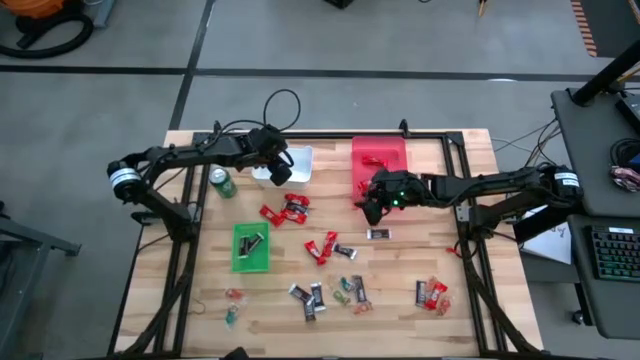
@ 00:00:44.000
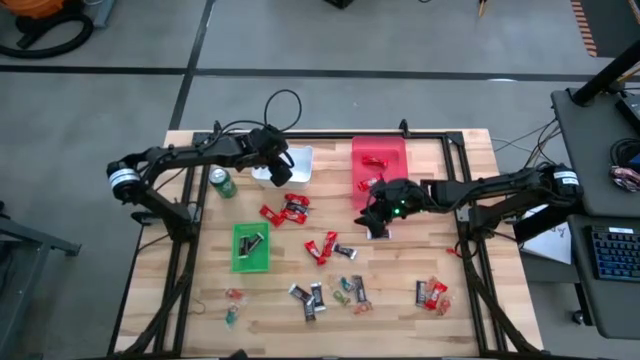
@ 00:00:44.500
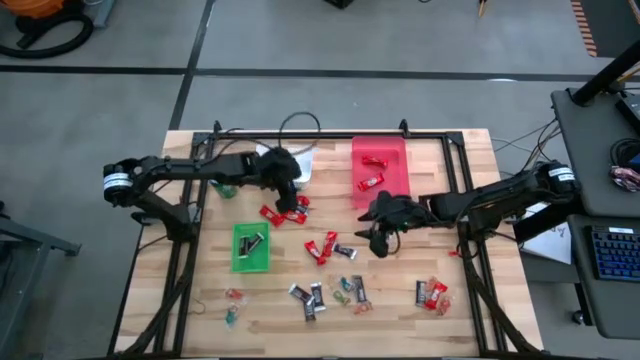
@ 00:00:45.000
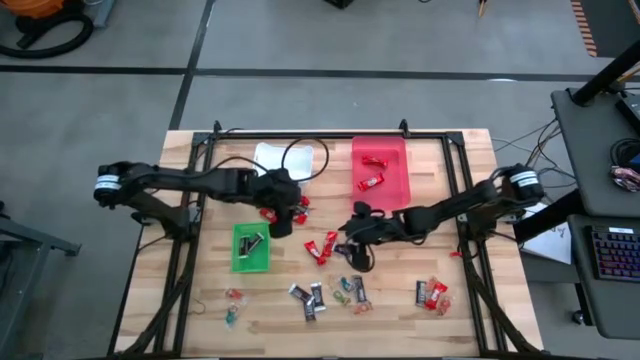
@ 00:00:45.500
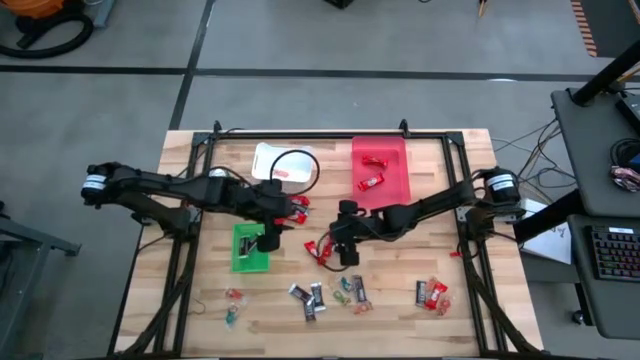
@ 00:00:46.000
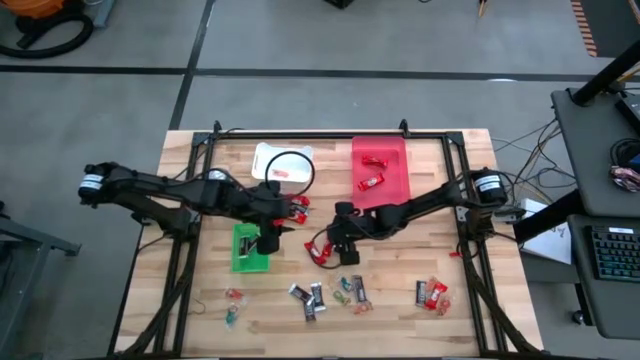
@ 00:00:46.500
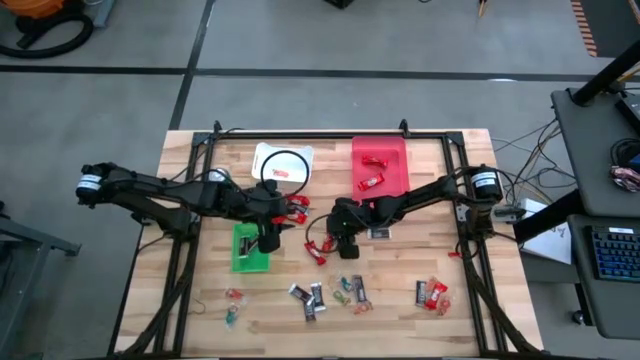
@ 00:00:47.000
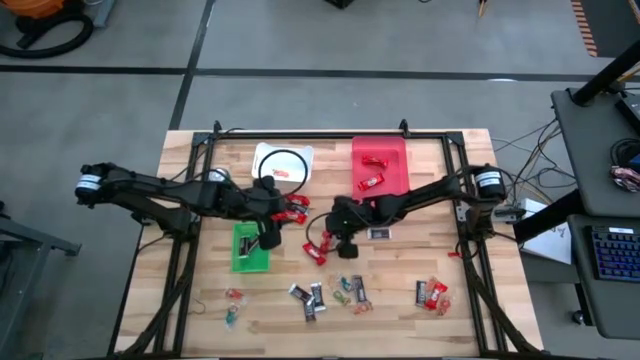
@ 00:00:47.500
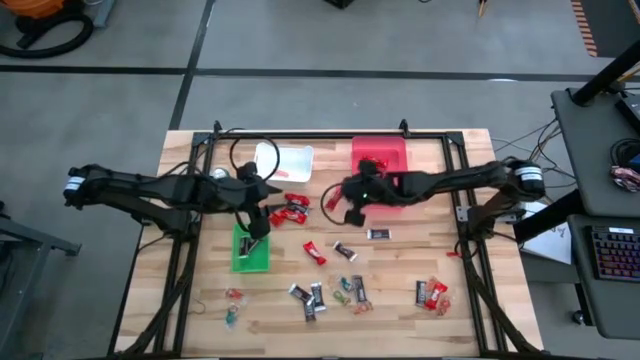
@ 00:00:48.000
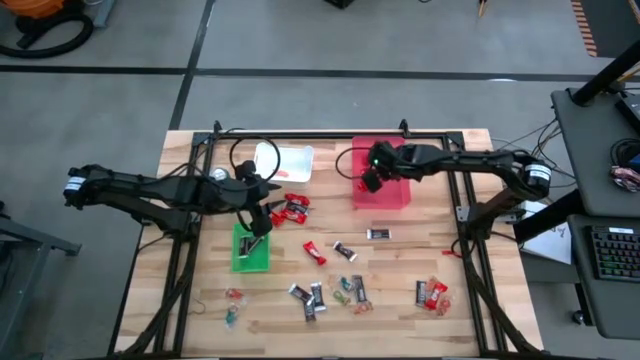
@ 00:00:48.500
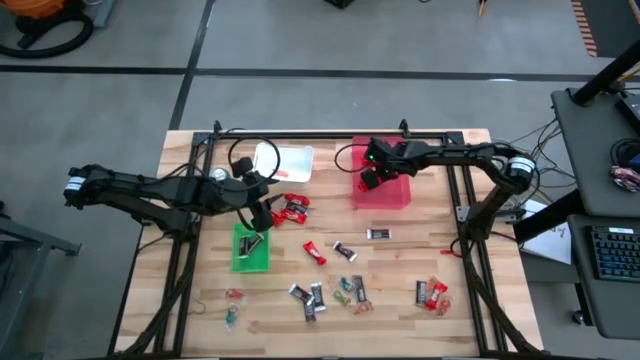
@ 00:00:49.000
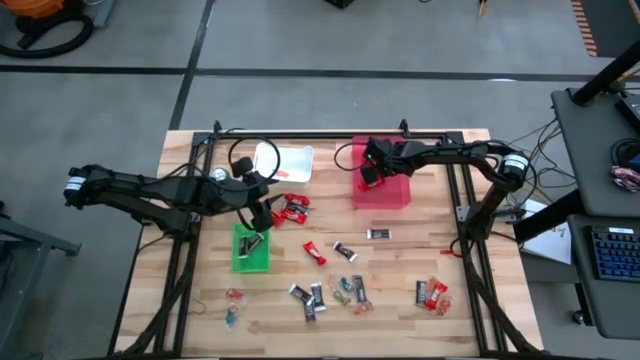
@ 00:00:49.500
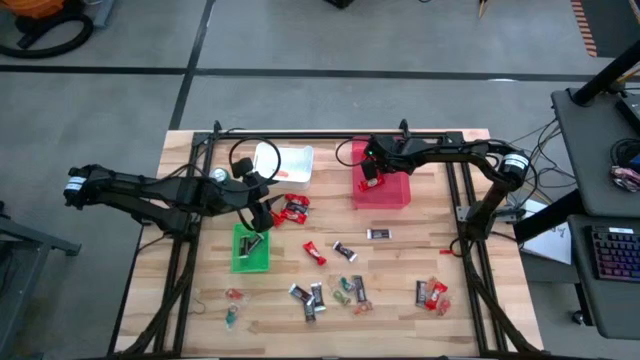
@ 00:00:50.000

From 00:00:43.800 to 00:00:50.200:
Task: Organize candy in baskets
Put the red chocolate into the pink bin

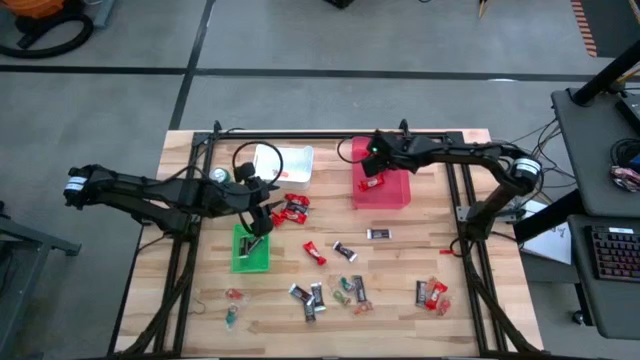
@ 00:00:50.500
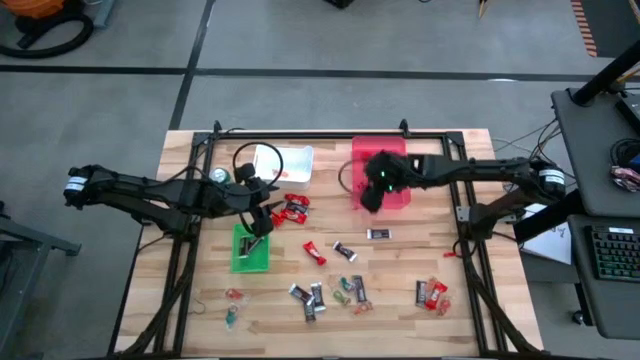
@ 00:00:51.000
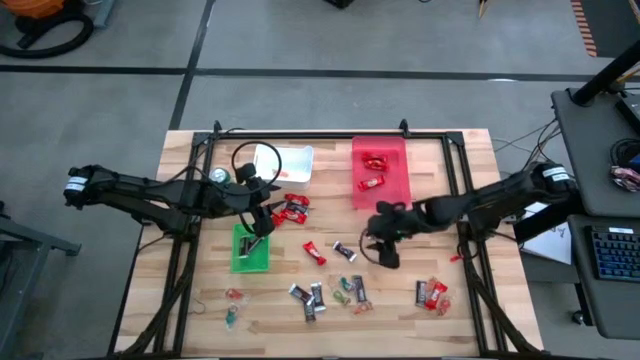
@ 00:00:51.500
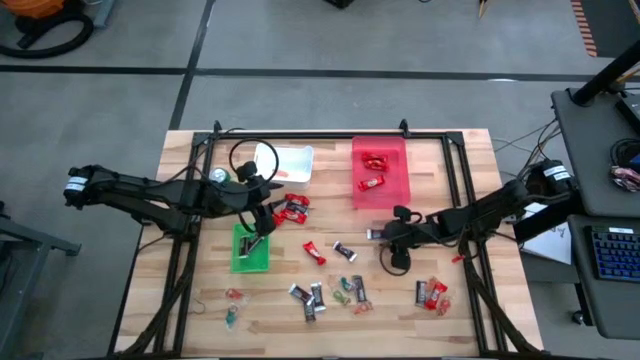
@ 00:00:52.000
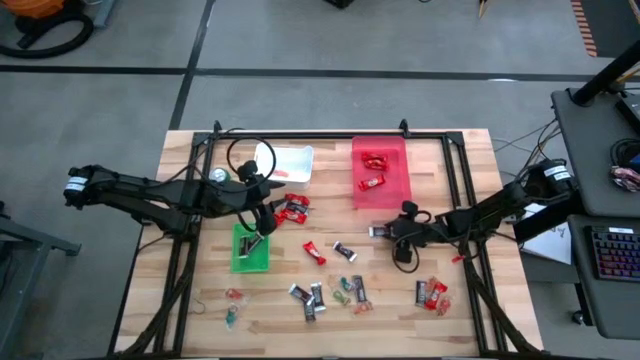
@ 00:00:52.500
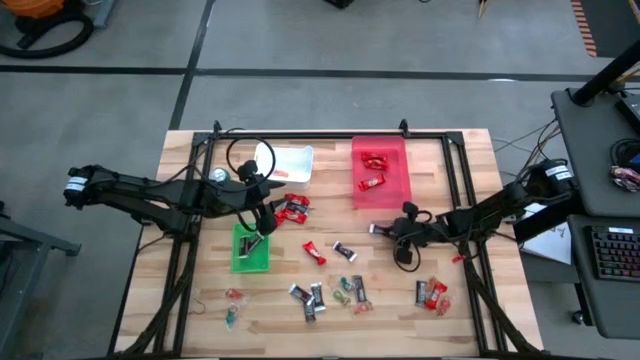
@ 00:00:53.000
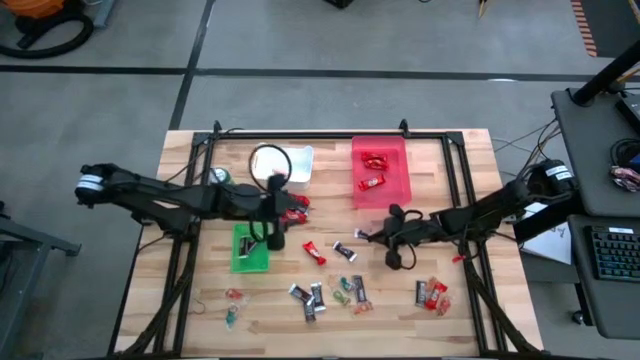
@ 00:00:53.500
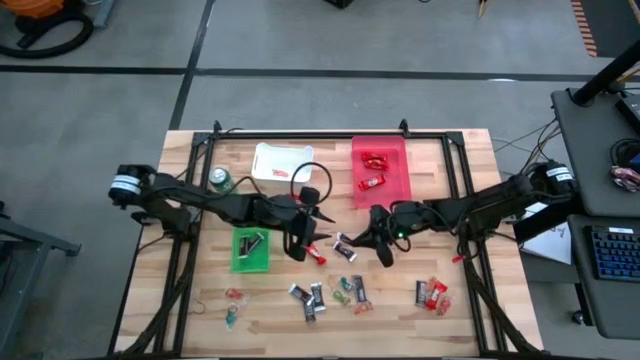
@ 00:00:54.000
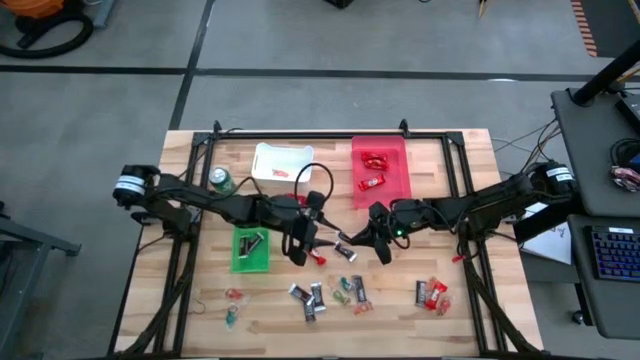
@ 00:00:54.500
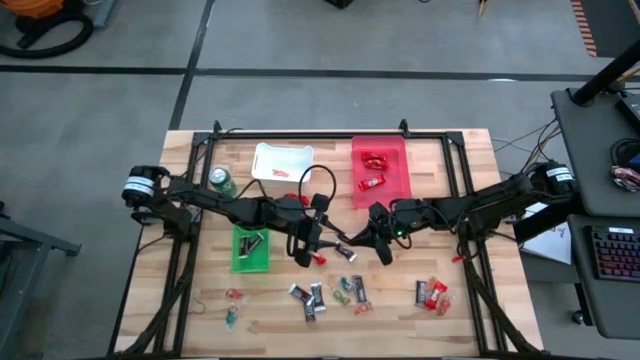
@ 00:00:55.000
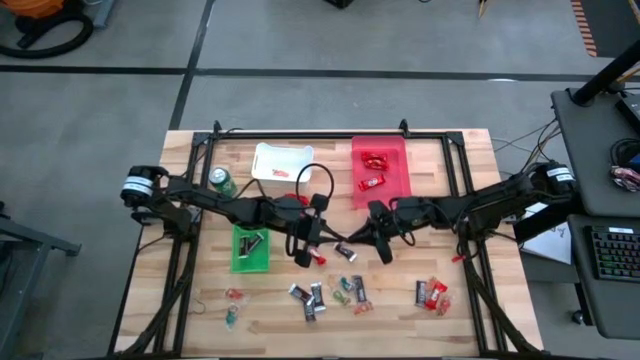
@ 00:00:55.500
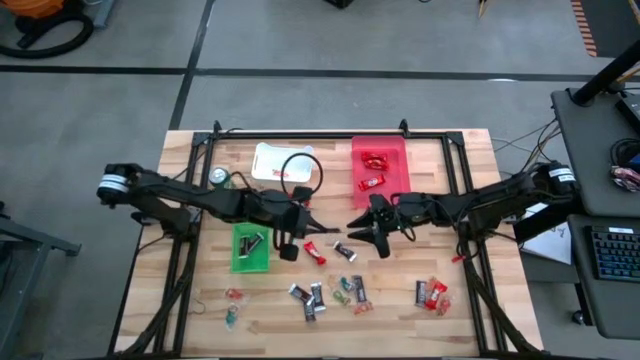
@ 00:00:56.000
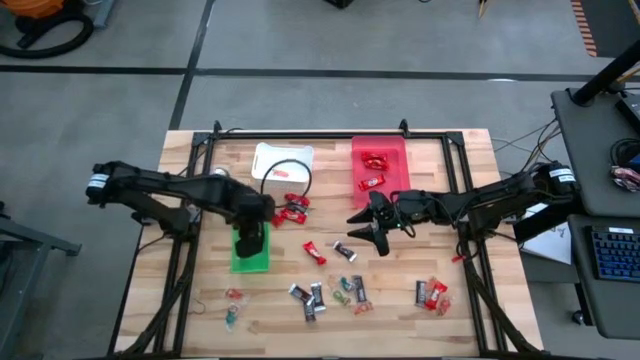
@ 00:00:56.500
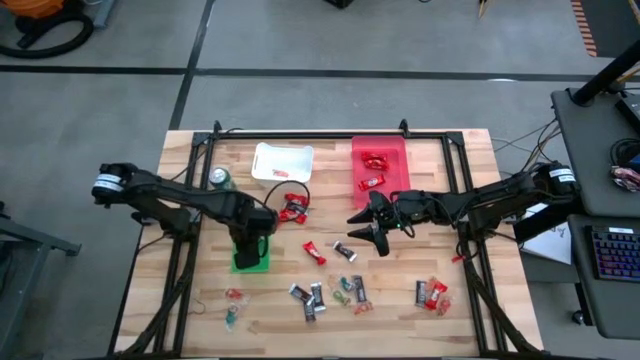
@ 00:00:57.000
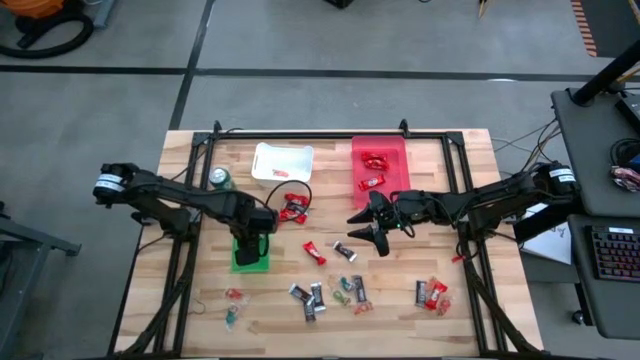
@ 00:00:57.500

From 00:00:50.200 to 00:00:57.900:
Put the brown chocolate into the green basket

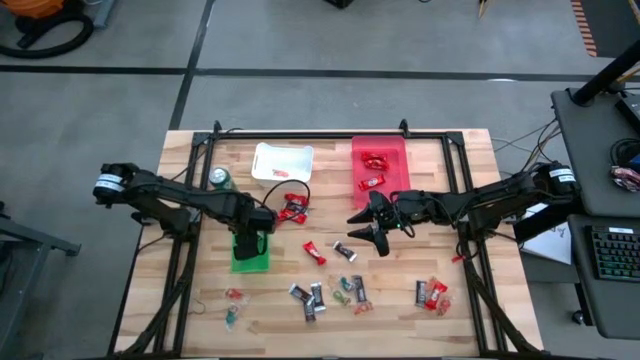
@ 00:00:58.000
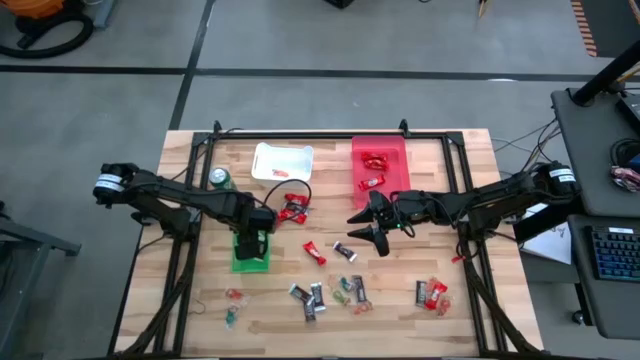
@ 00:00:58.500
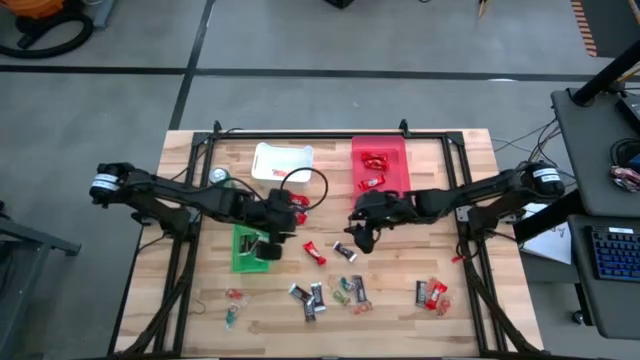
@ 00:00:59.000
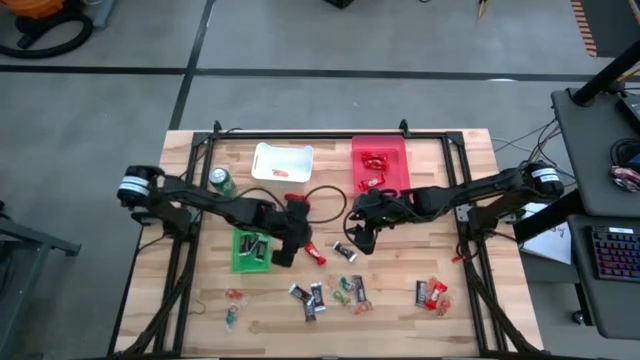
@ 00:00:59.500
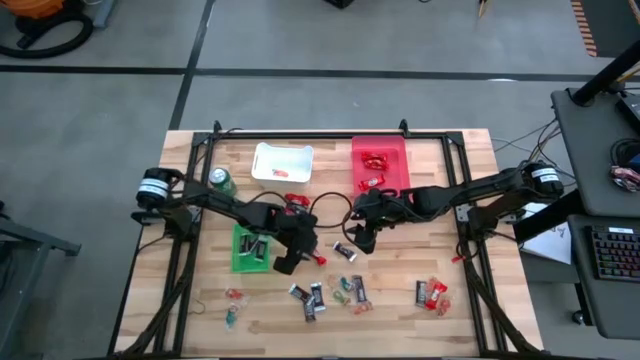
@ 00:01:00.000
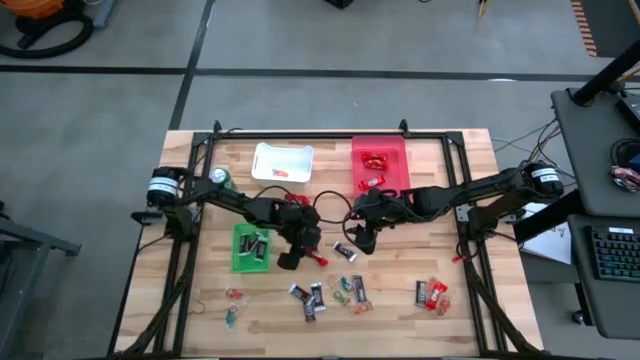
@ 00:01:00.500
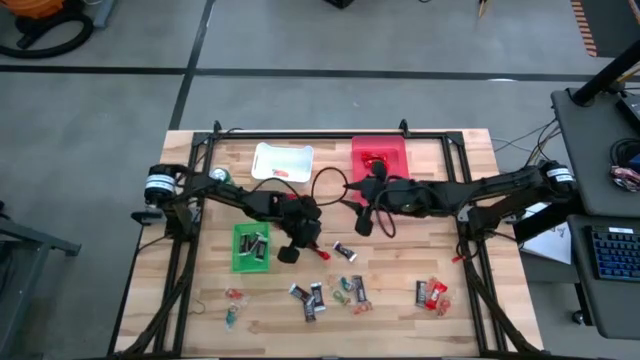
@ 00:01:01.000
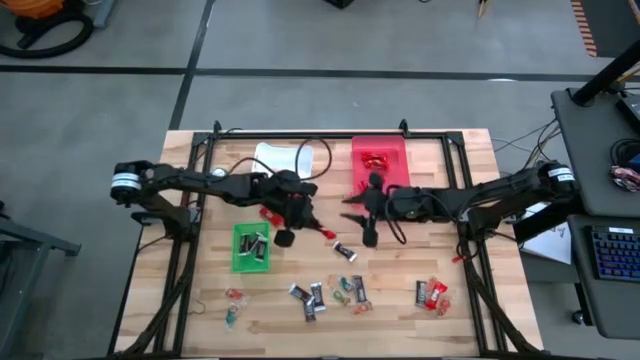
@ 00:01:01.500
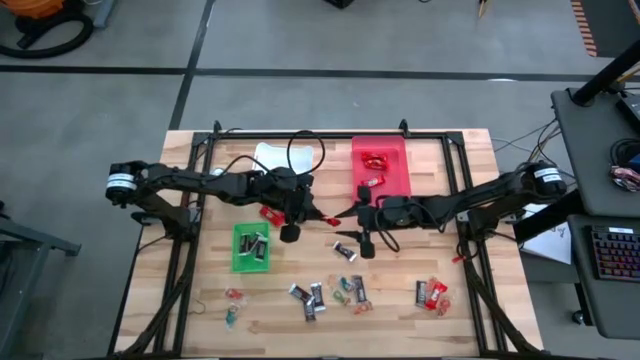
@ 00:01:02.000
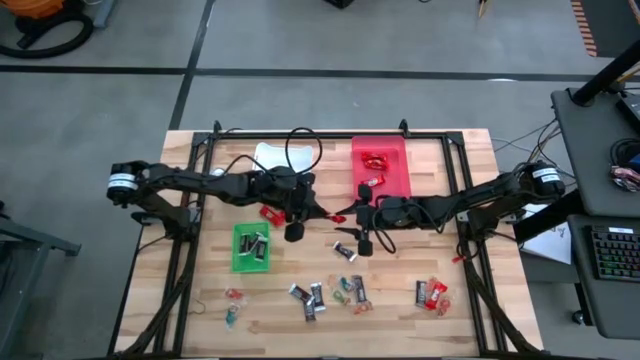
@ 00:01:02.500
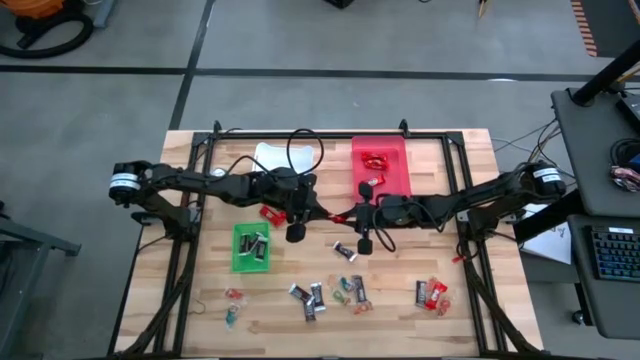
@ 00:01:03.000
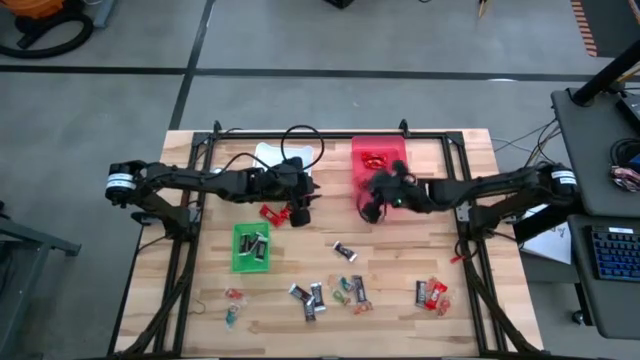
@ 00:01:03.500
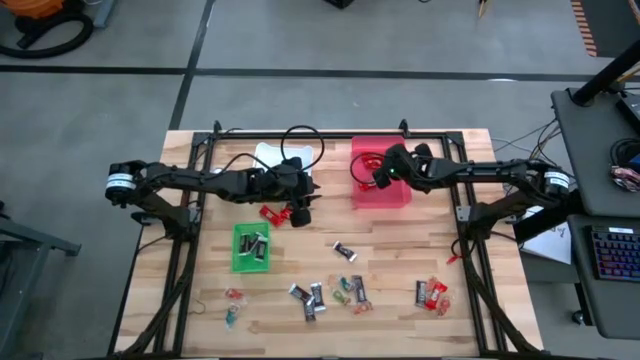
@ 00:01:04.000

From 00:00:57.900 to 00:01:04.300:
Put the red chocolate into the pink bin

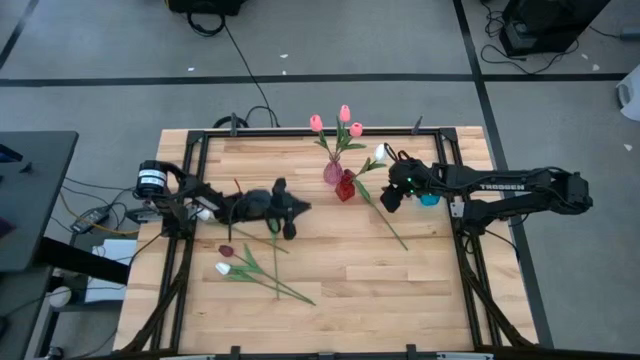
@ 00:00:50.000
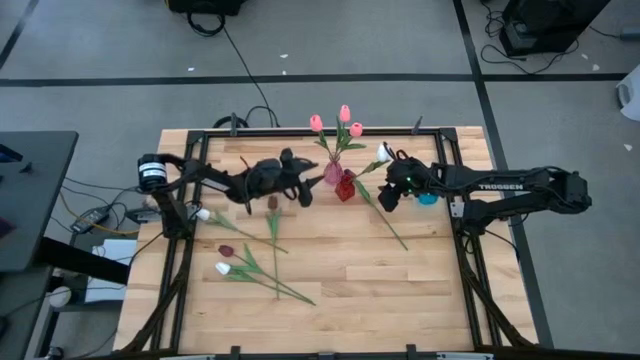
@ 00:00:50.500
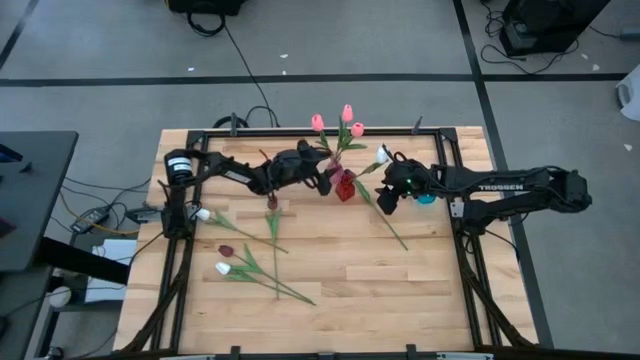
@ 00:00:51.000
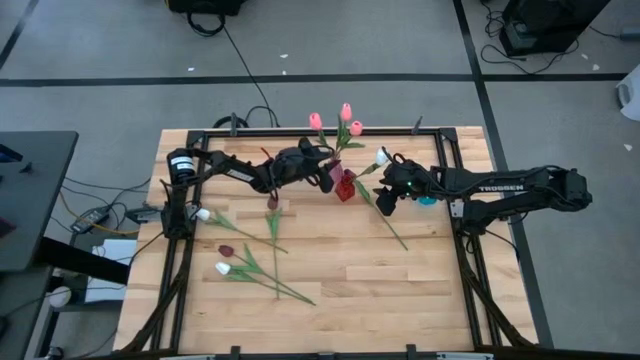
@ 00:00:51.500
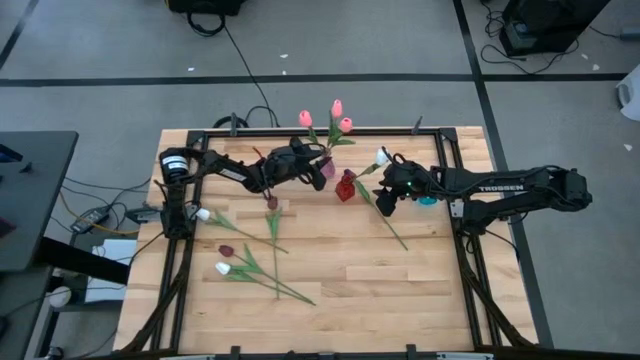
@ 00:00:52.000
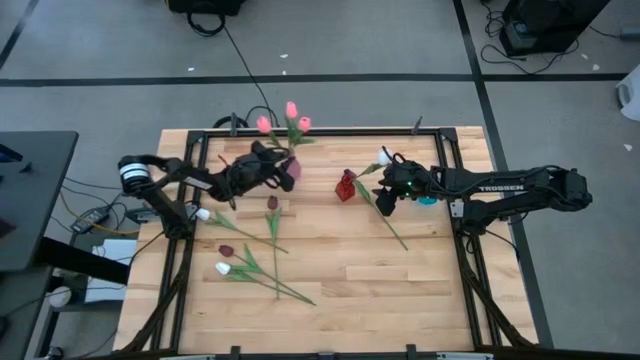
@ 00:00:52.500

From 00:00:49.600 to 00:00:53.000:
Task: Sort flowers into vase by color
Move the pink vase to the top left of the table
